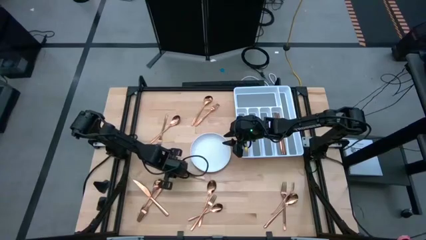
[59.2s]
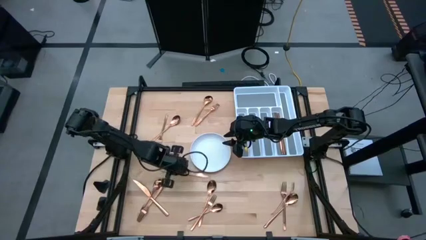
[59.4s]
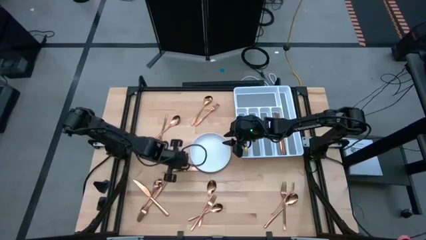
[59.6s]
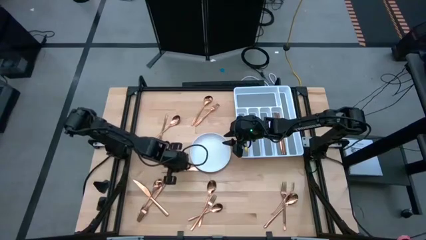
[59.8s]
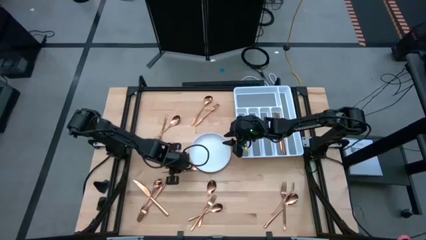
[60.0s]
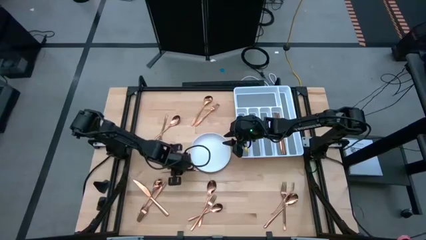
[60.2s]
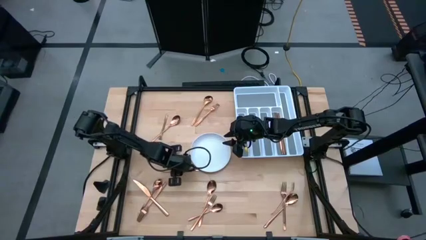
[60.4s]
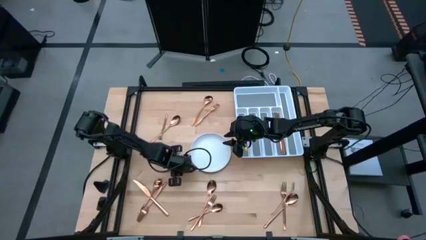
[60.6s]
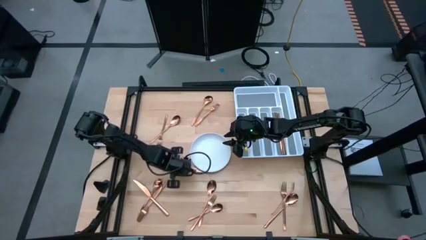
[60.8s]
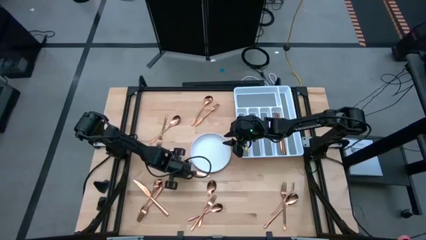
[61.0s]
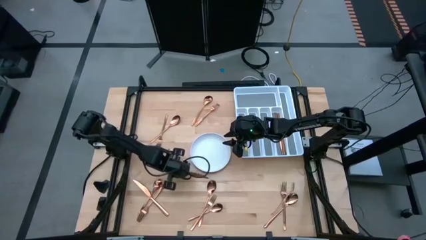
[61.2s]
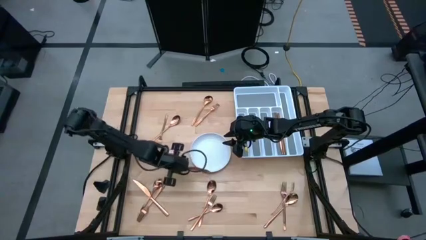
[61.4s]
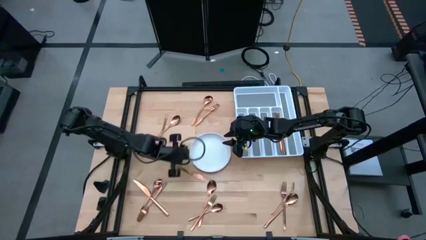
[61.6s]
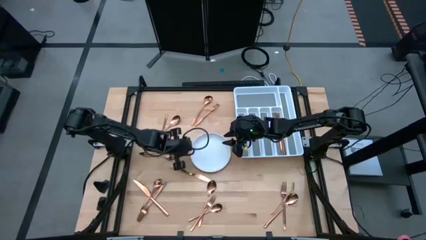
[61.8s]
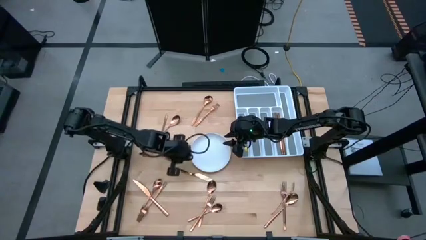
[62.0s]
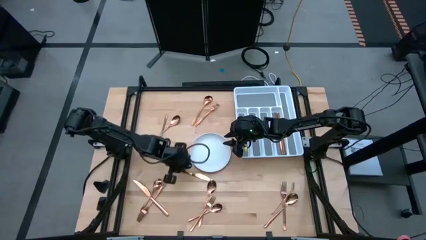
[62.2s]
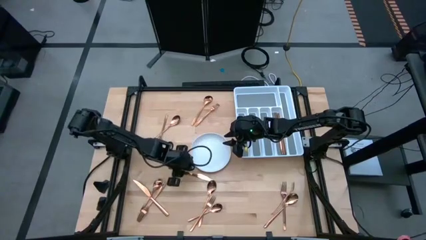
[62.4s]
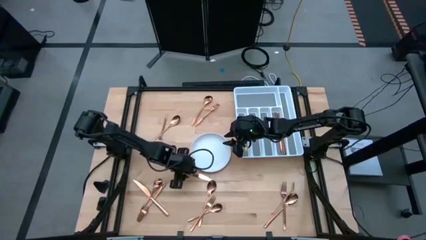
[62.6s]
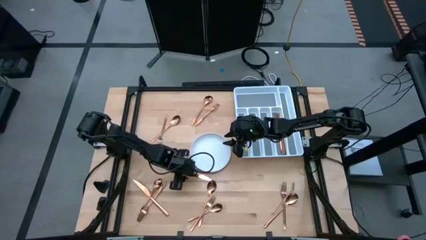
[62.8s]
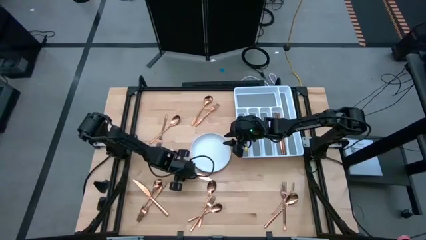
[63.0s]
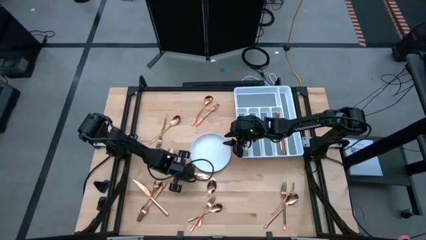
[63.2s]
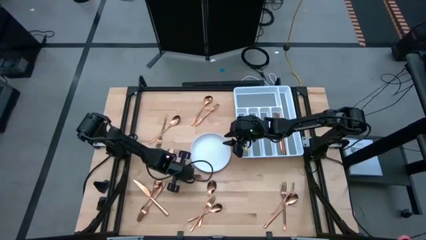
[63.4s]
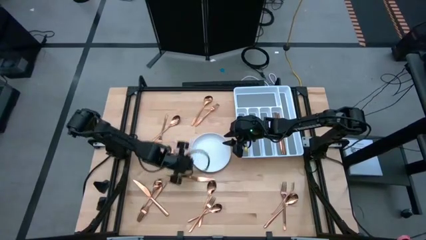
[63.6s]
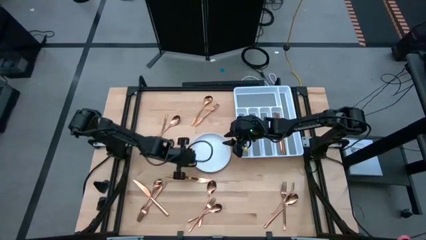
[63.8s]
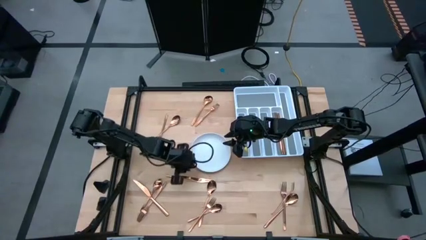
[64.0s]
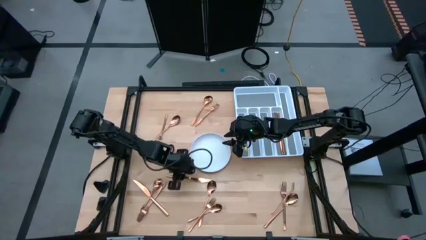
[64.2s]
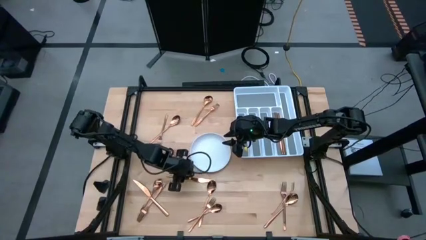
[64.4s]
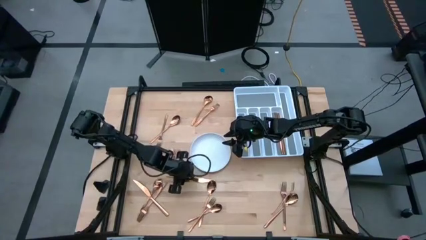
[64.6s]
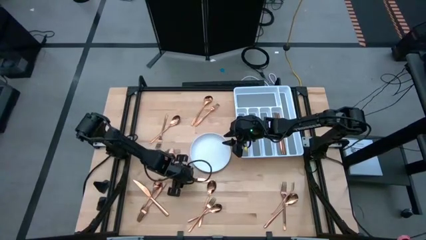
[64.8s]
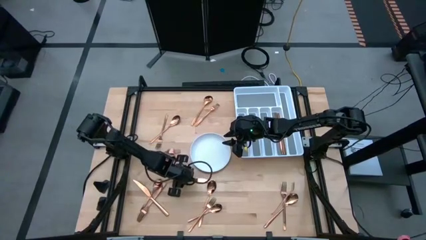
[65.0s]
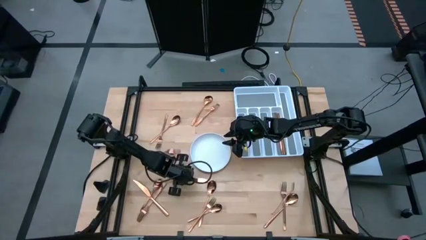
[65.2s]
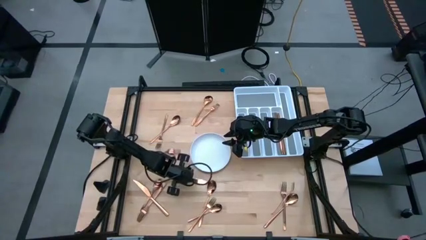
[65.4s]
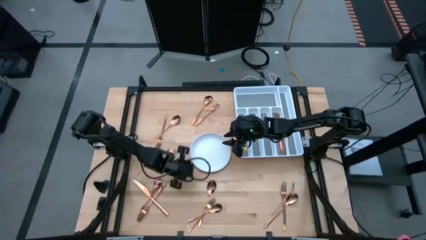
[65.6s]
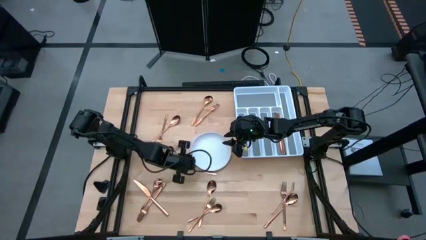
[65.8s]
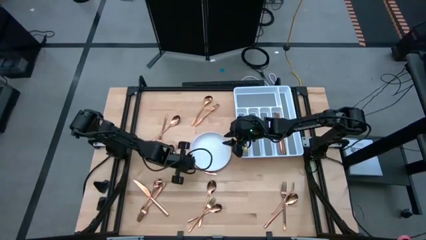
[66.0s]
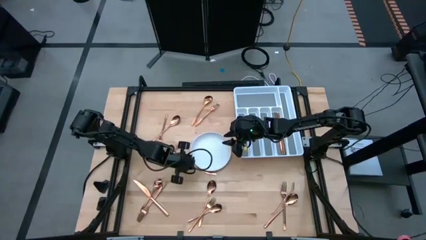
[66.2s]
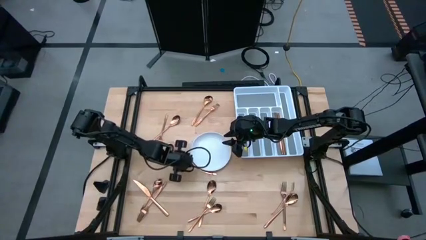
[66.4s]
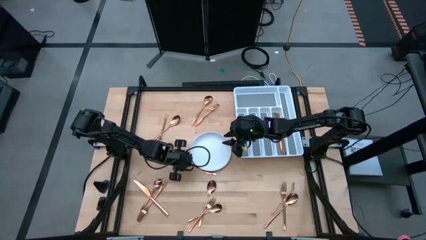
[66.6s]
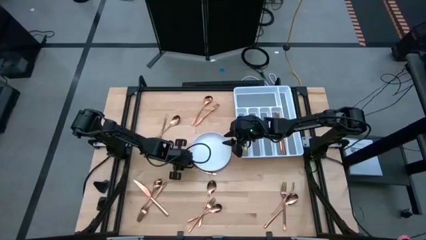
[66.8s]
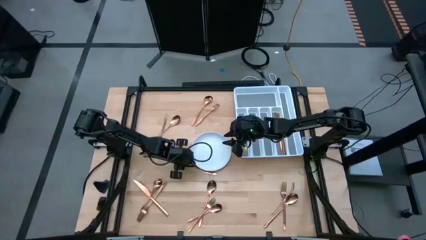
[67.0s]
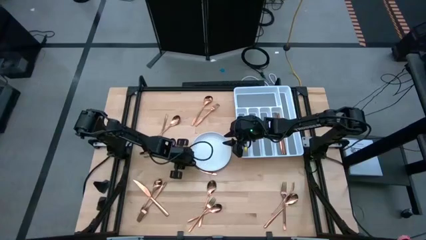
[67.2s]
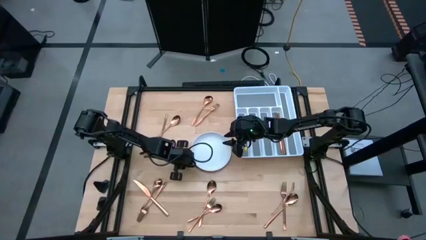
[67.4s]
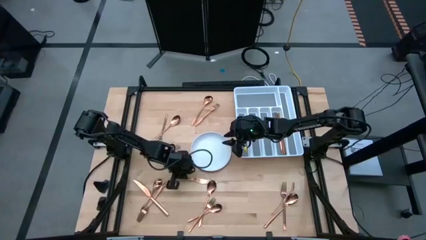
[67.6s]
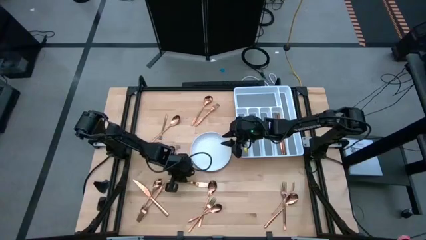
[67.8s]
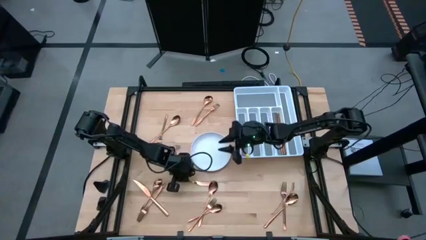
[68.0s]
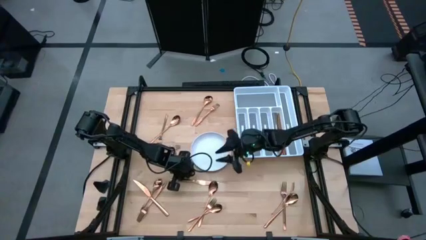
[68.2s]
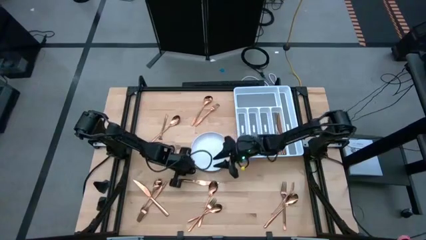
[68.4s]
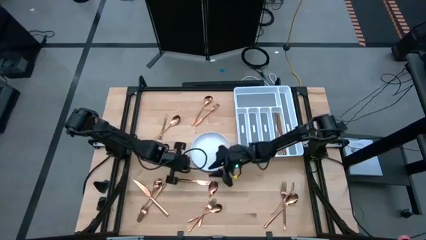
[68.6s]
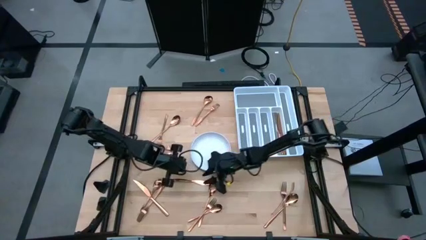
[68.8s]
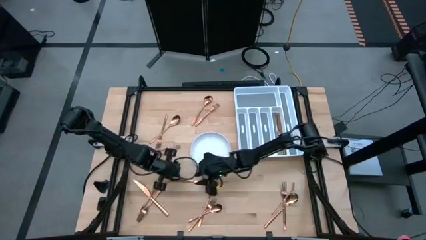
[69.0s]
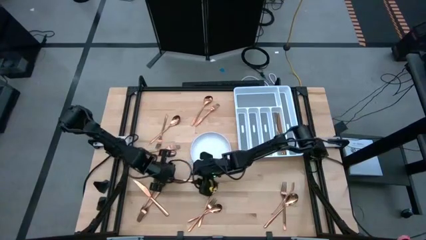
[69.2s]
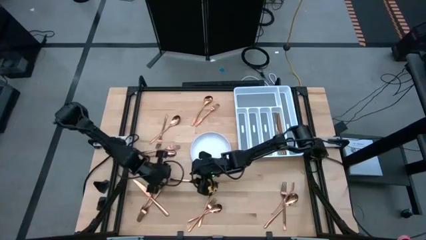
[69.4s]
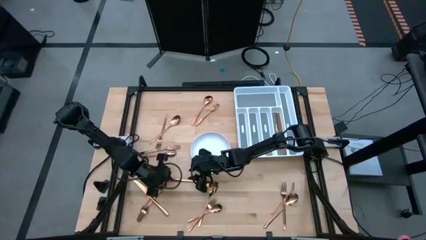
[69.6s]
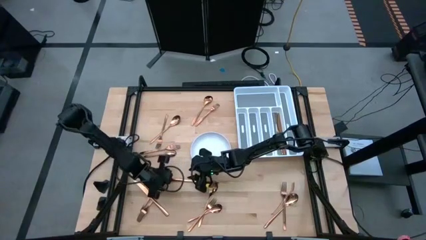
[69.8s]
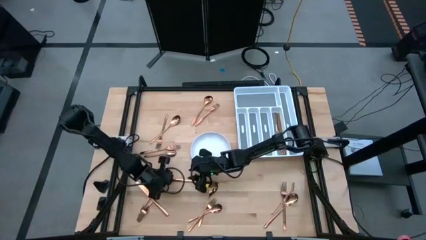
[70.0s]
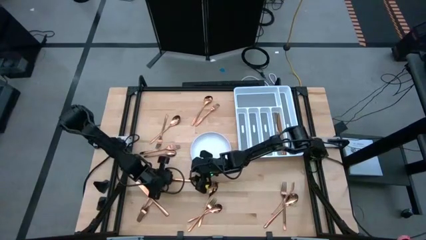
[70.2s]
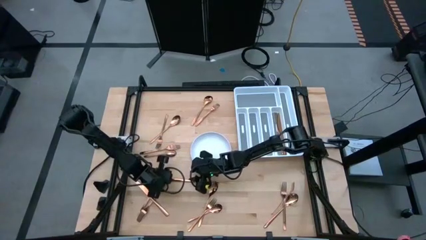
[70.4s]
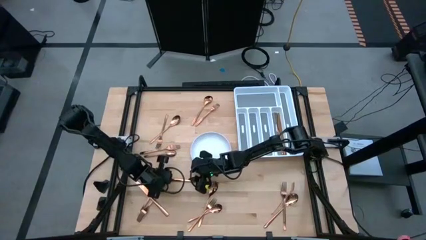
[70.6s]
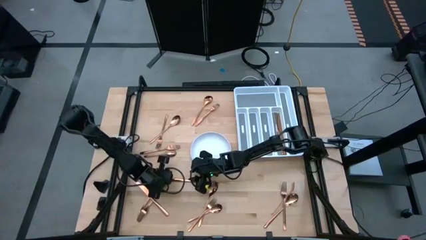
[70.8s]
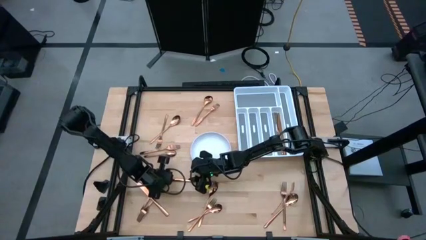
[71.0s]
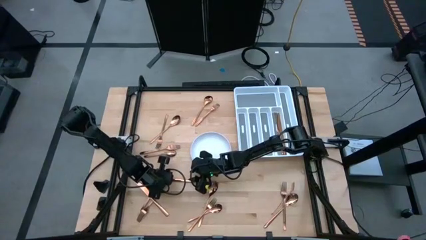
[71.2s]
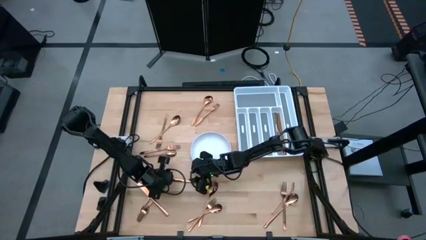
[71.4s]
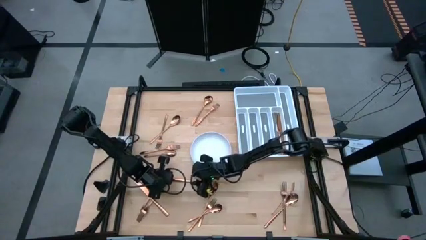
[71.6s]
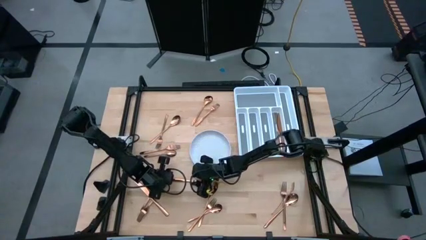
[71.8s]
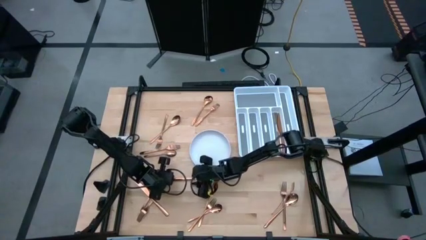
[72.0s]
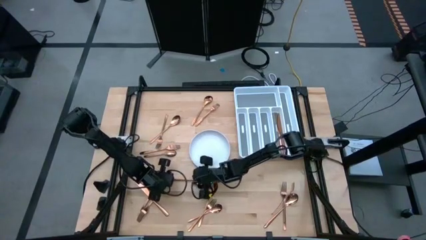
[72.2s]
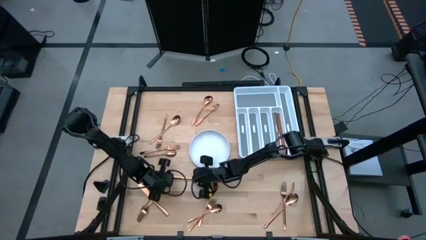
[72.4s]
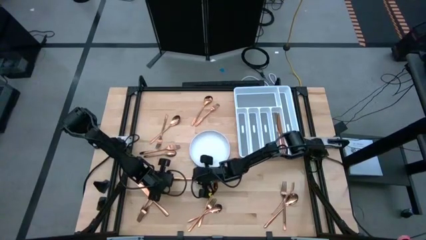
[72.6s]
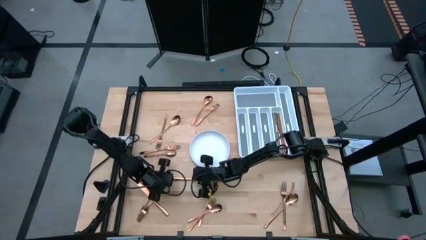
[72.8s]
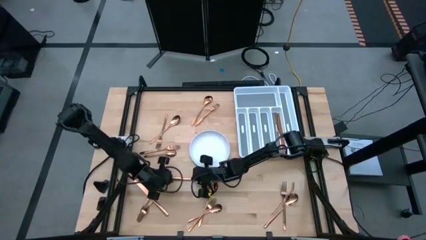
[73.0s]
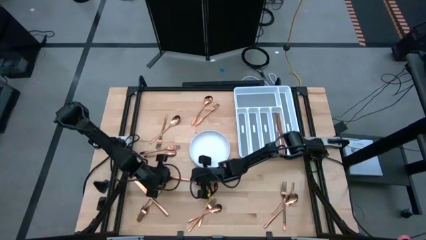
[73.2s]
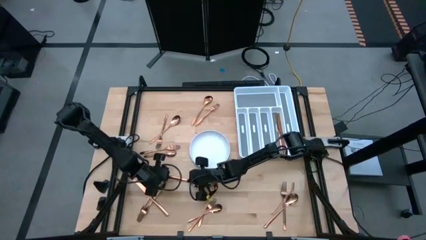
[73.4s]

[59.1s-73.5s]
Task: Sort silverware
Put the knife in the silverware tray
